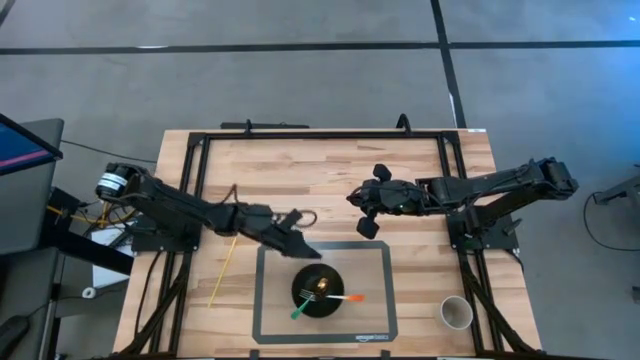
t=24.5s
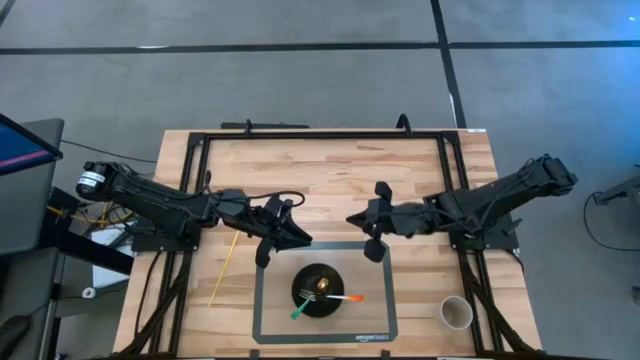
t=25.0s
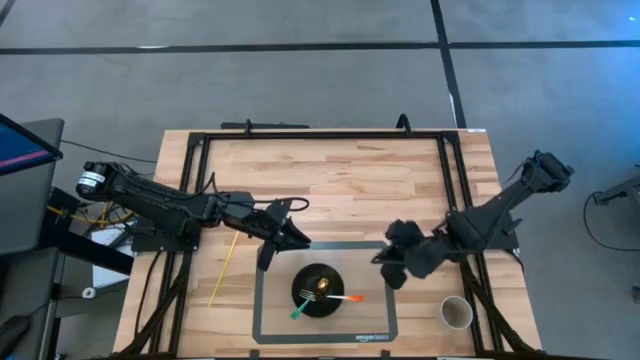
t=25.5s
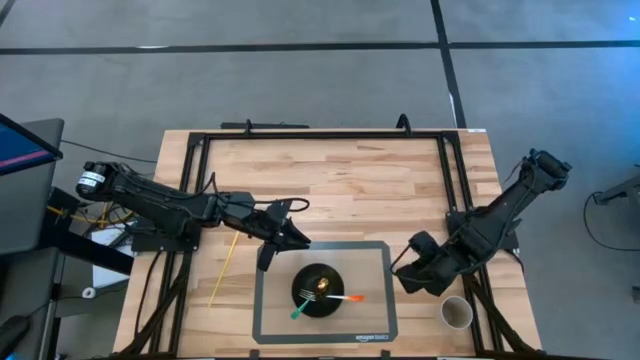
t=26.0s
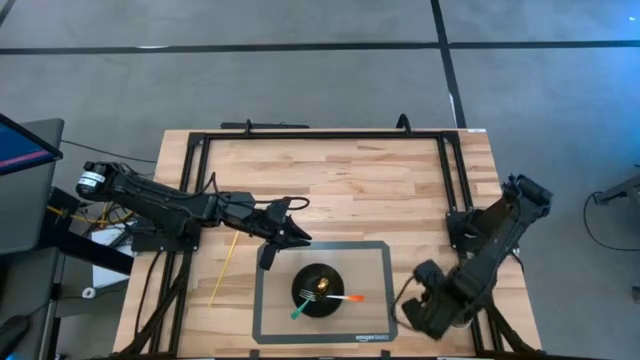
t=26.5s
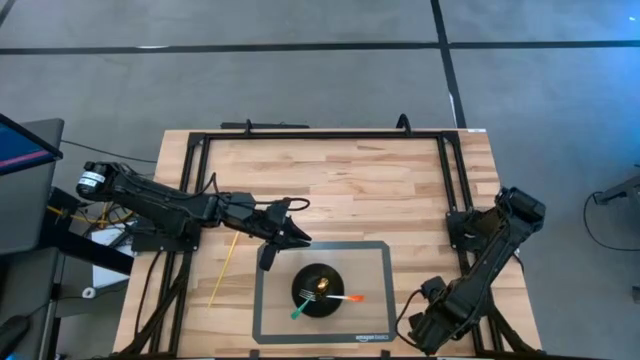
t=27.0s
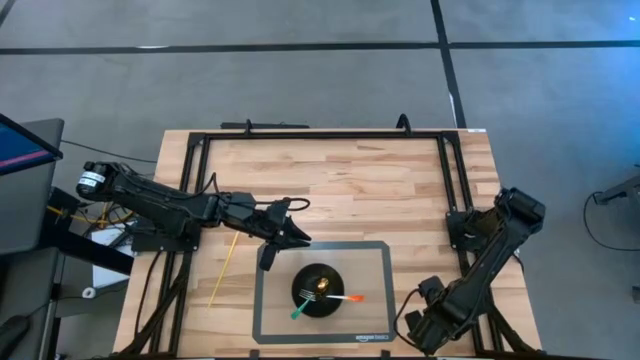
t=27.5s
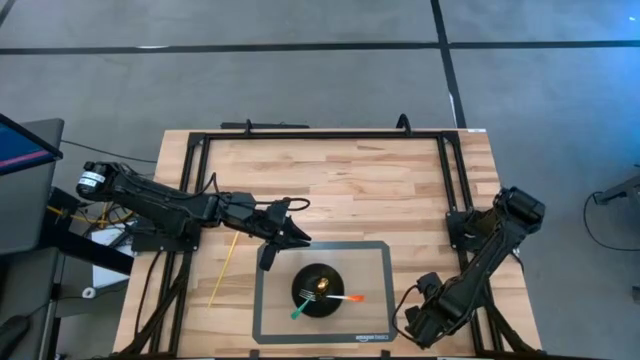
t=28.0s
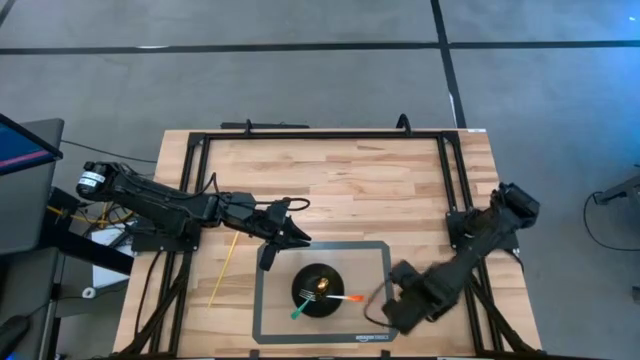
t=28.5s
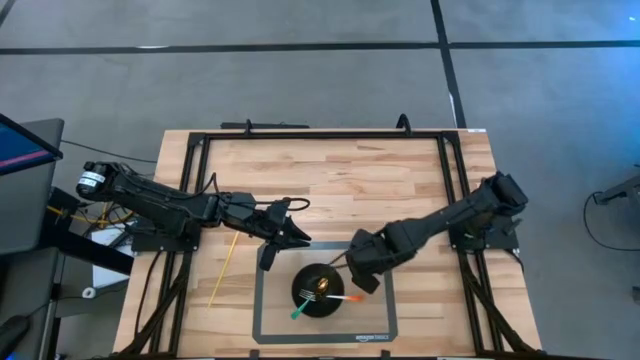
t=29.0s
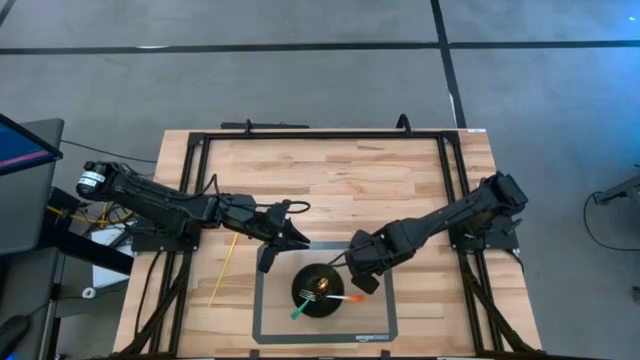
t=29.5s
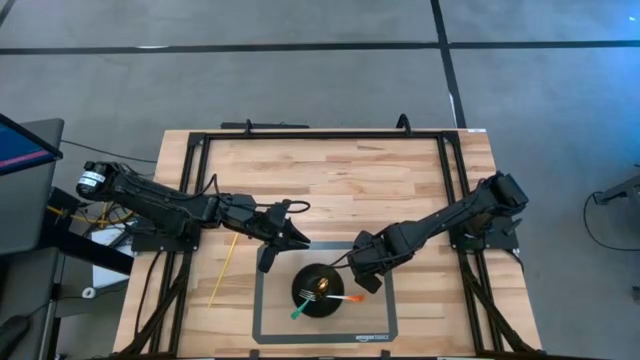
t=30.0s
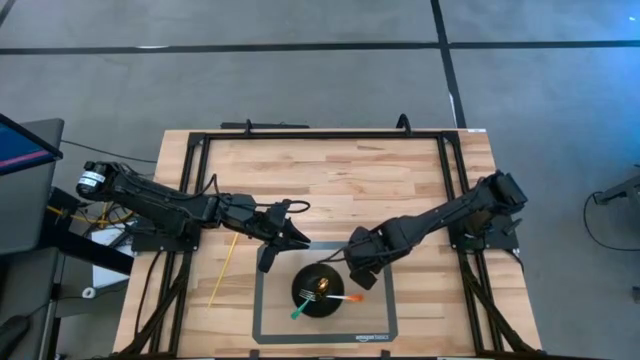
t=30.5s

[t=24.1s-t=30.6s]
Task: Pick & Place Utensil
Put the white cup on the transparent mat

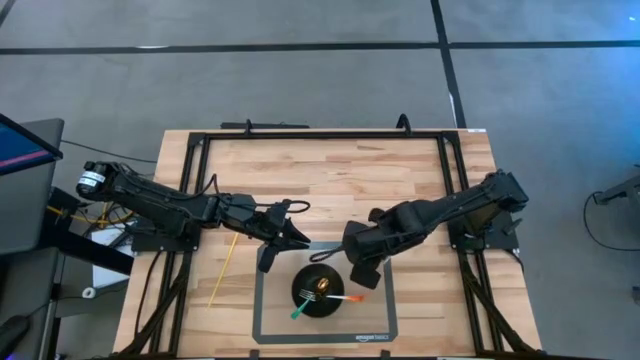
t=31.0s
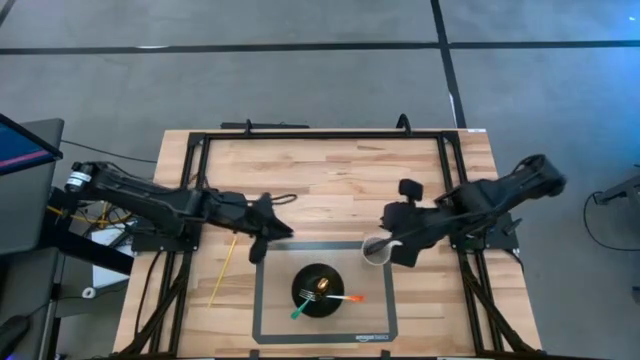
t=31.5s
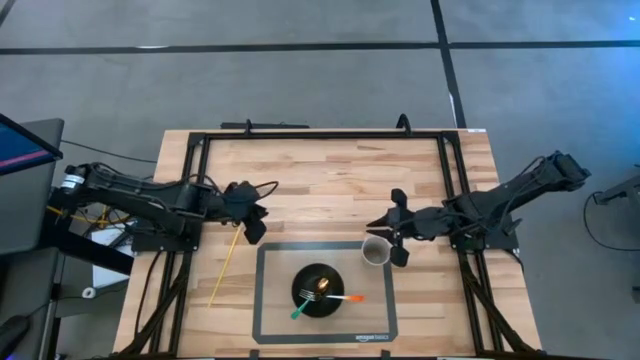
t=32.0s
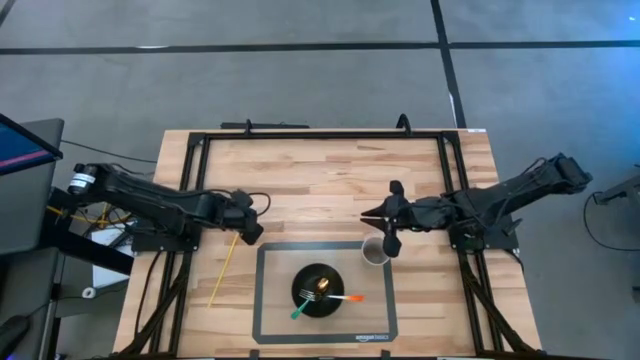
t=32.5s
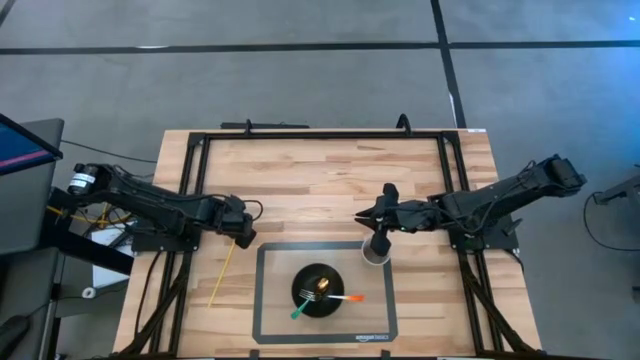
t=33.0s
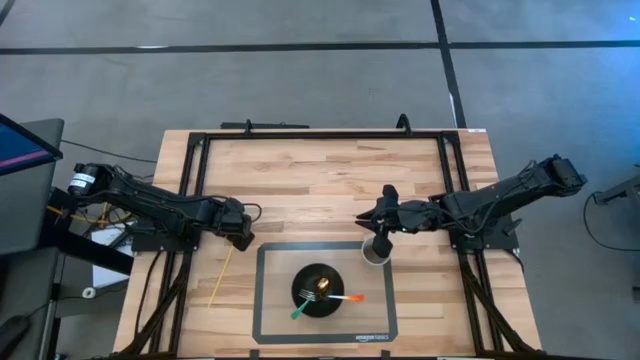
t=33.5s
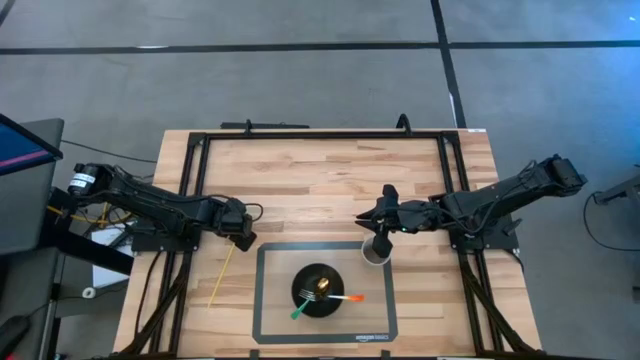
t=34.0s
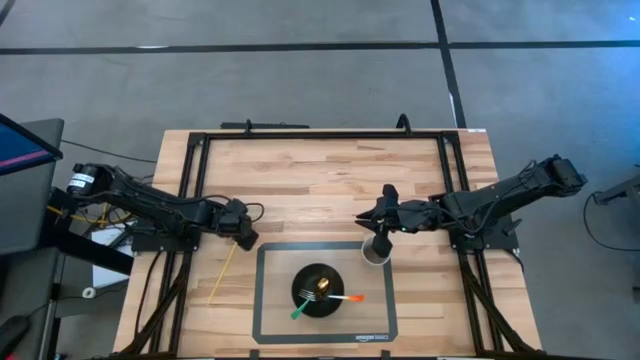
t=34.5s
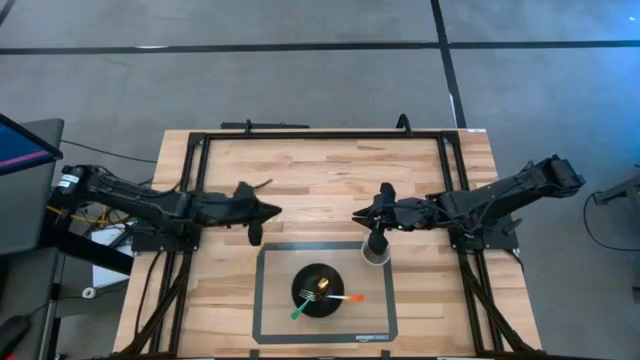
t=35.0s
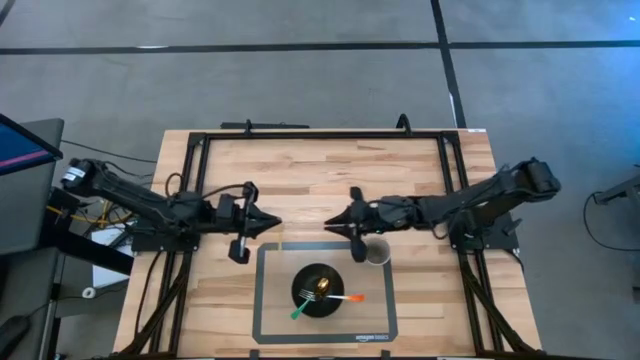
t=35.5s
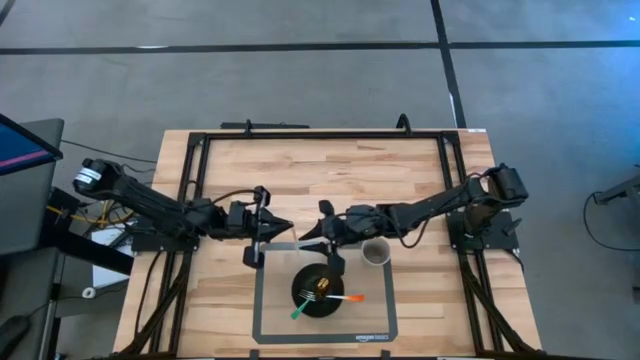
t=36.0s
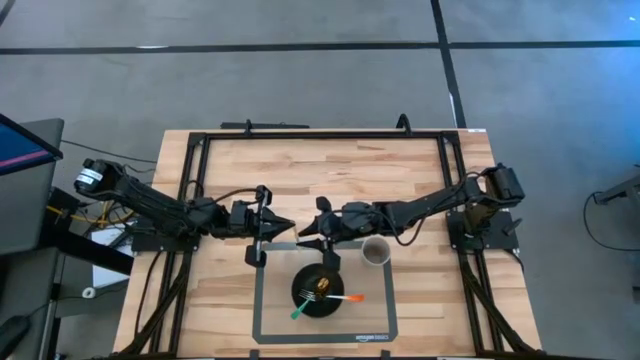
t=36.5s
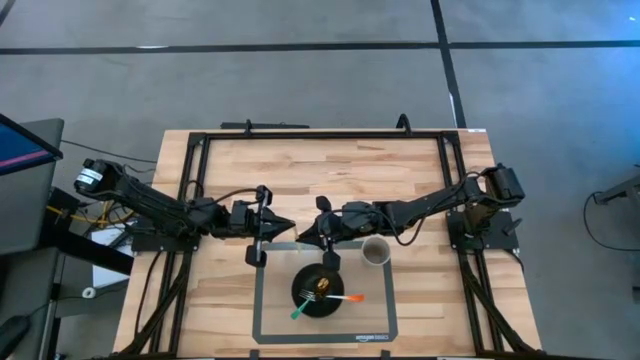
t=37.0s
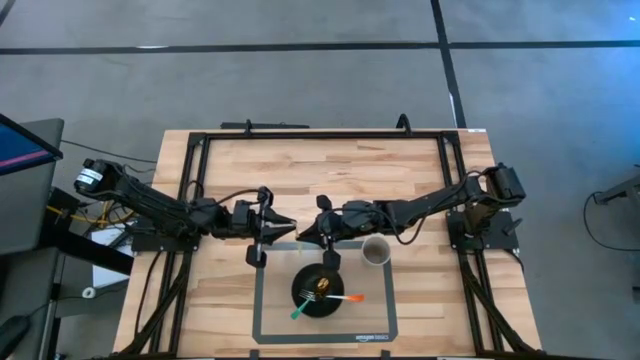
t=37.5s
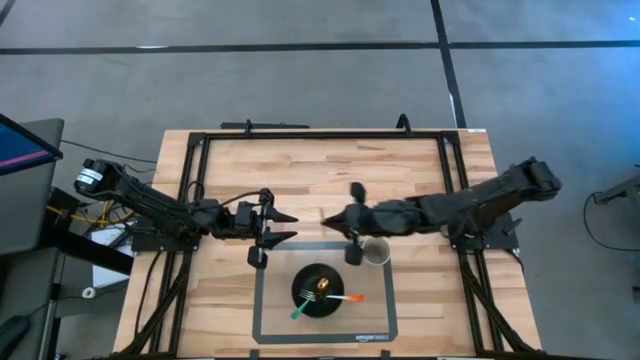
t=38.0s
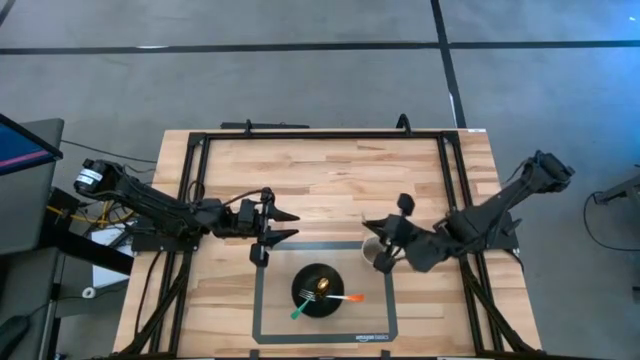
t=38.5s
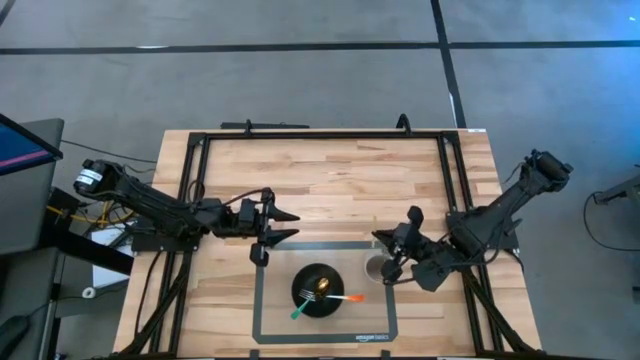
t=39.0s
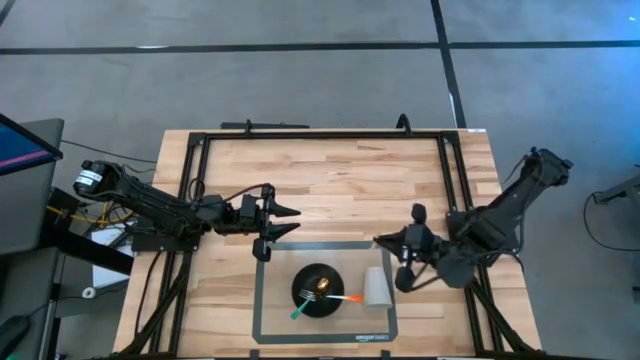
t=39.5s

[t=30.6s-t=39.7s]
Put the yellow straw into the the white cup

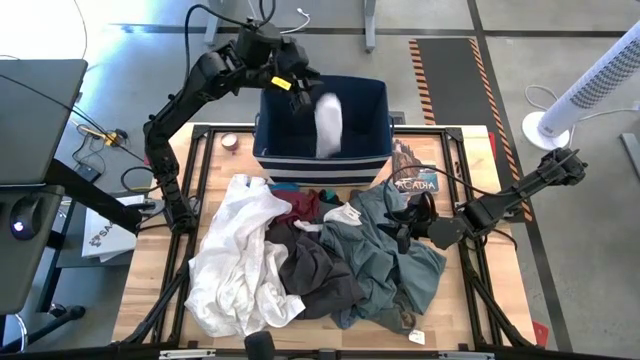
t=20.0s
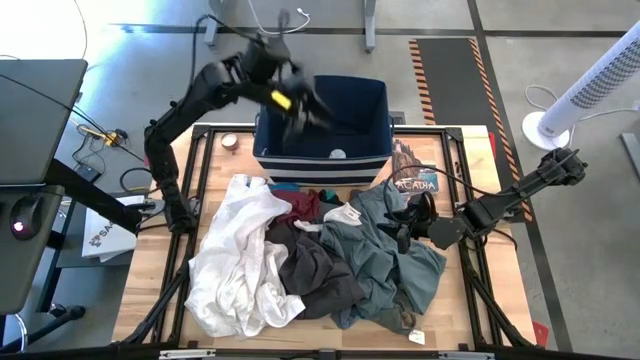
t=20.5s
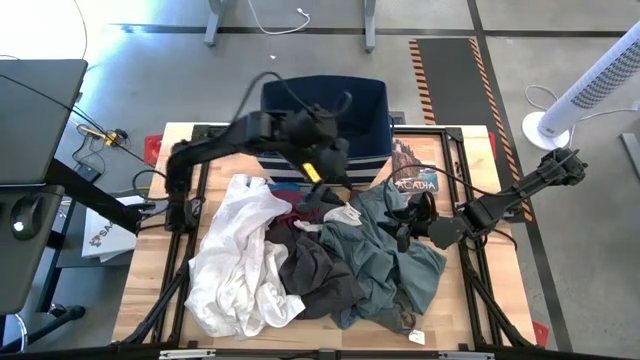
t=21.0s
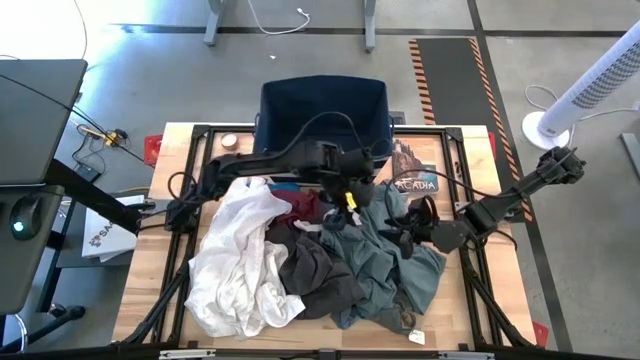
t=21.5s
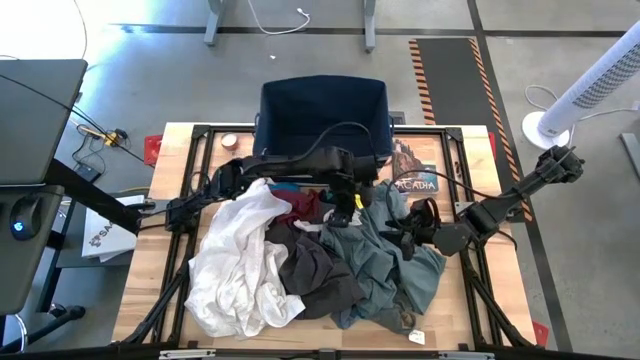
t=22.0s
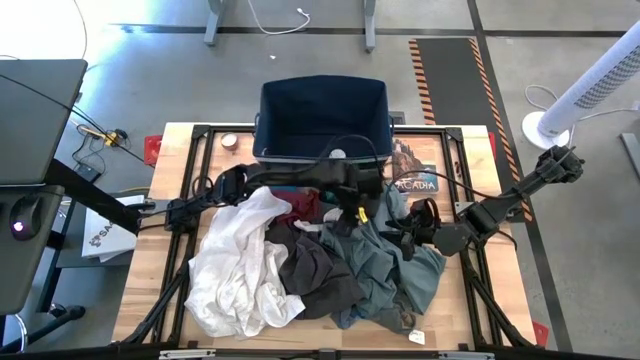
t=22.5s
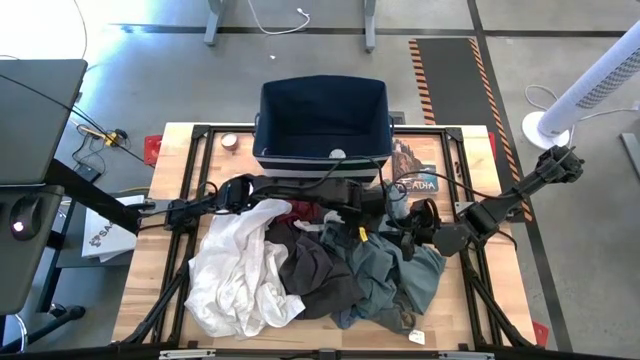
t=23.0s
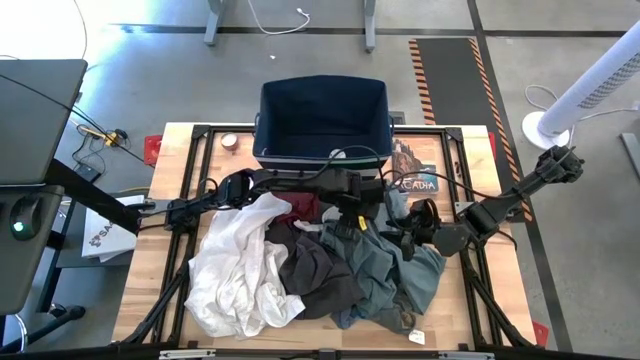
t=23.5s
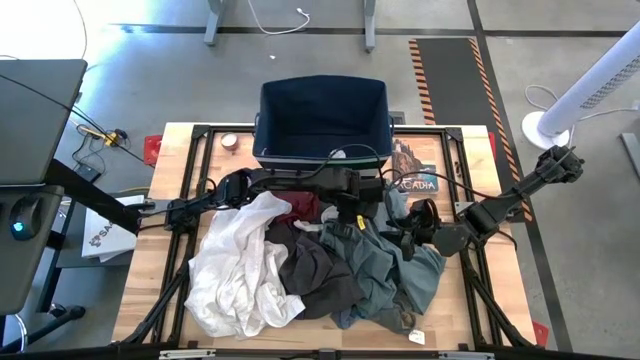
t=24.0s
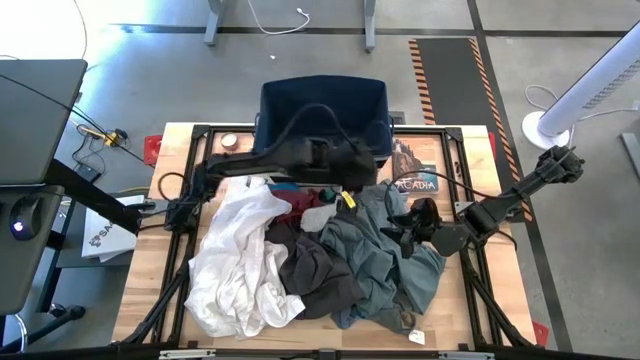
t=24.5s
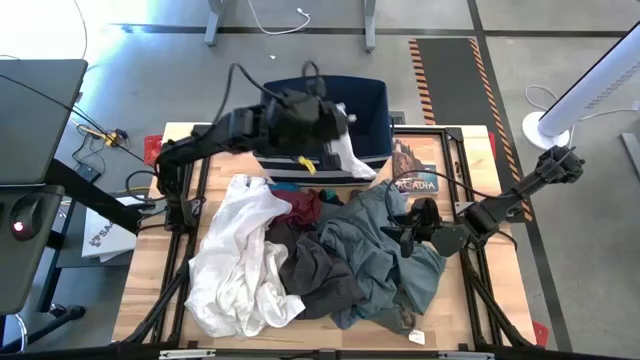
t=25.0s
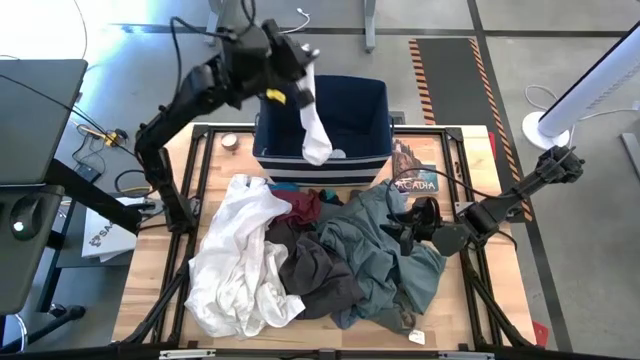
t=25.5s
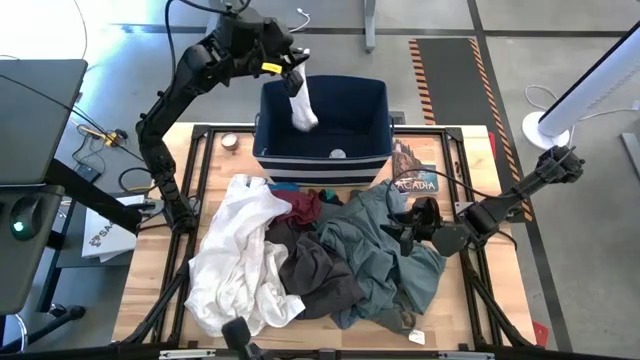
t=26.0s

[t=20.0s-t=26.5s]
Task: Sort clothes
Put the white sock into the blue laundry bin
